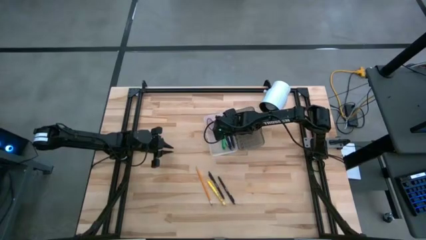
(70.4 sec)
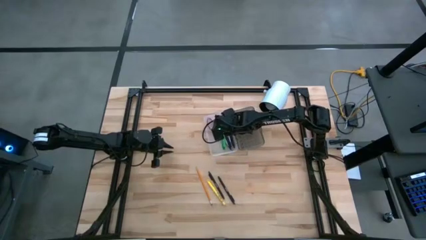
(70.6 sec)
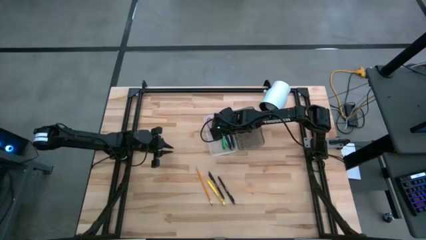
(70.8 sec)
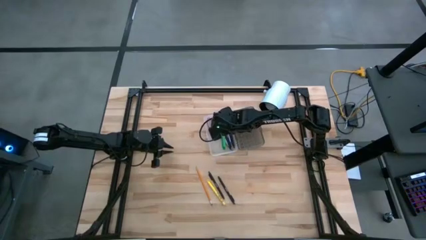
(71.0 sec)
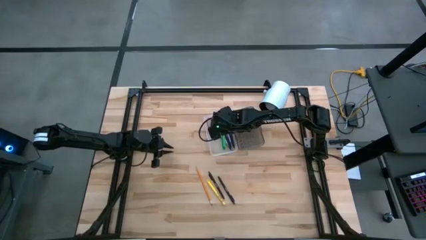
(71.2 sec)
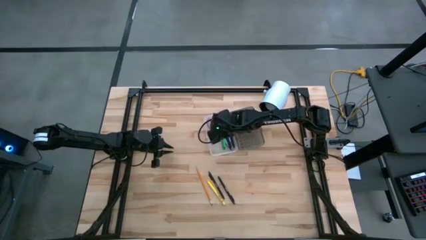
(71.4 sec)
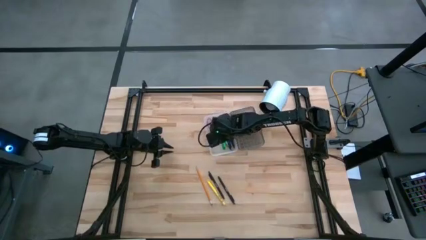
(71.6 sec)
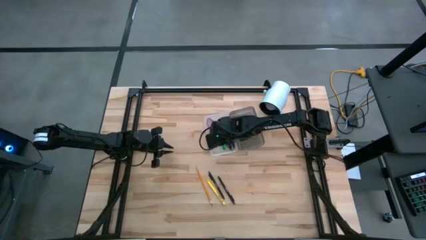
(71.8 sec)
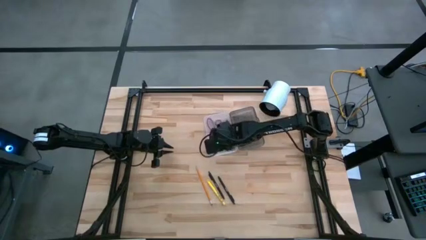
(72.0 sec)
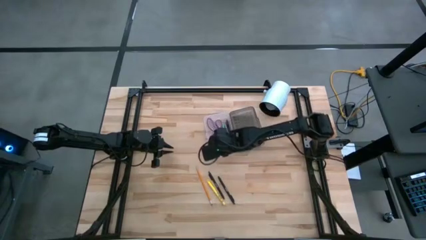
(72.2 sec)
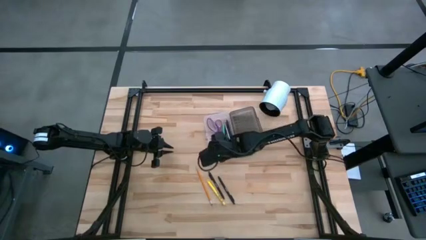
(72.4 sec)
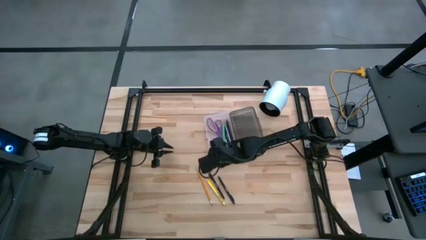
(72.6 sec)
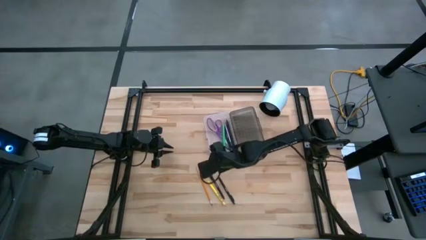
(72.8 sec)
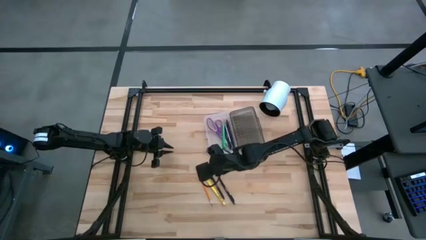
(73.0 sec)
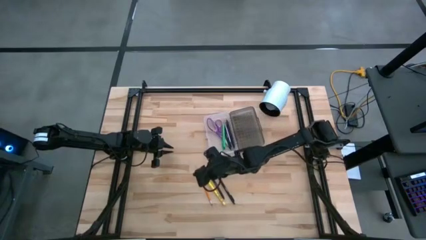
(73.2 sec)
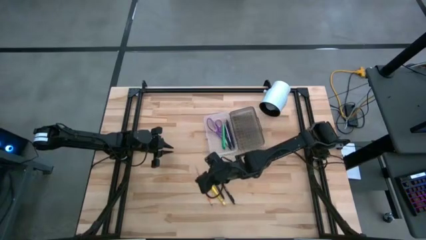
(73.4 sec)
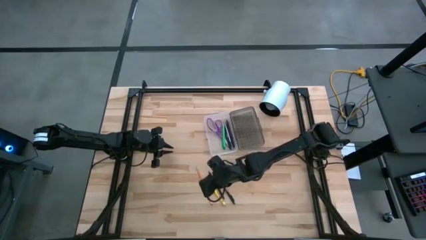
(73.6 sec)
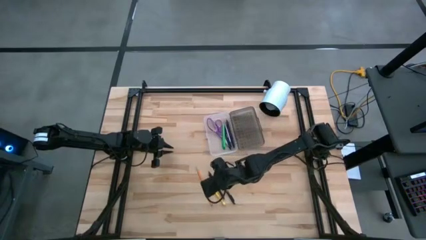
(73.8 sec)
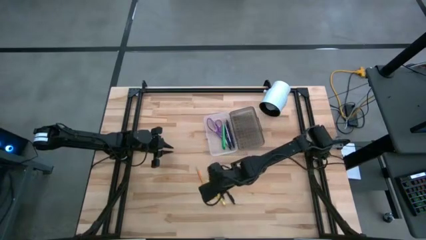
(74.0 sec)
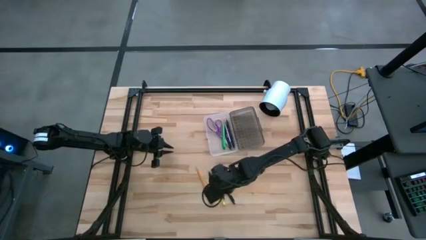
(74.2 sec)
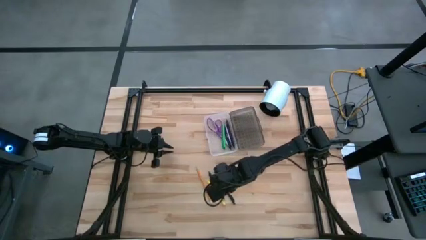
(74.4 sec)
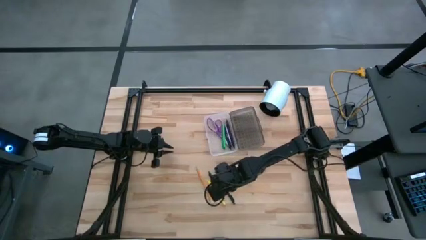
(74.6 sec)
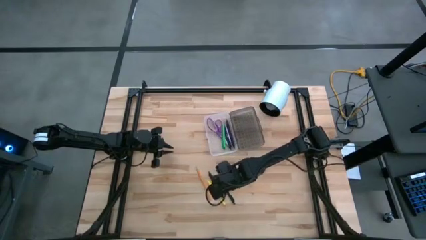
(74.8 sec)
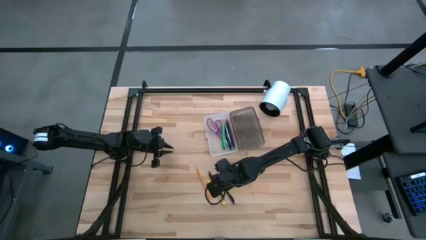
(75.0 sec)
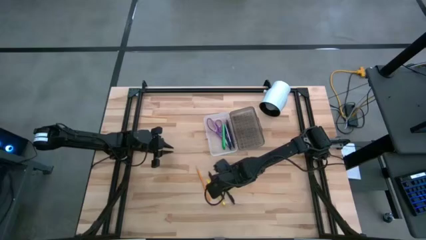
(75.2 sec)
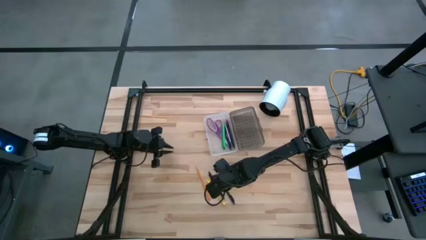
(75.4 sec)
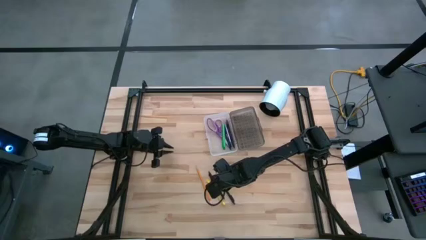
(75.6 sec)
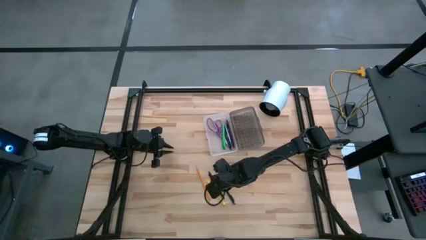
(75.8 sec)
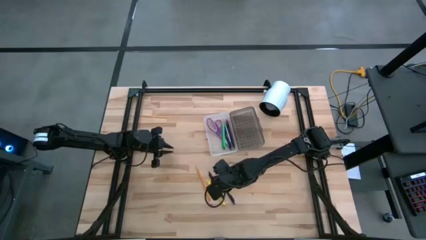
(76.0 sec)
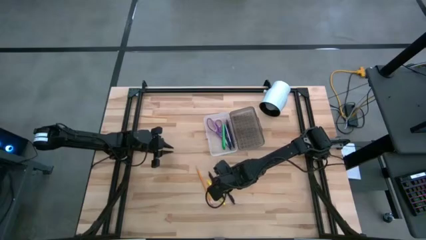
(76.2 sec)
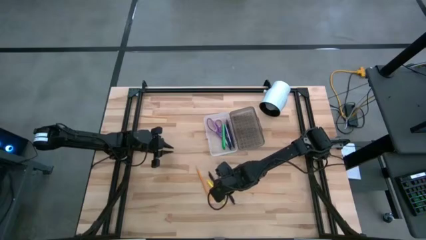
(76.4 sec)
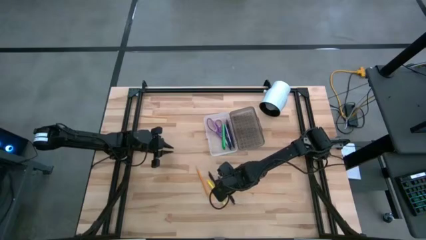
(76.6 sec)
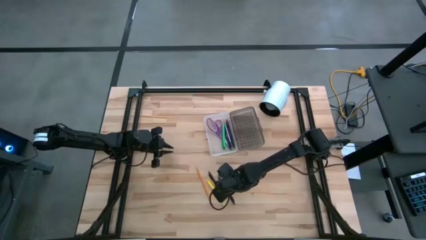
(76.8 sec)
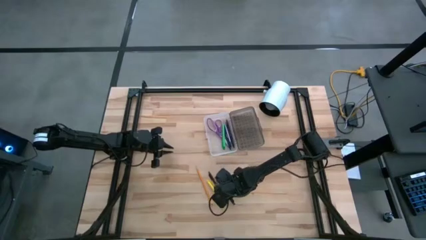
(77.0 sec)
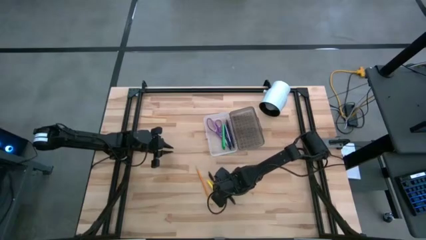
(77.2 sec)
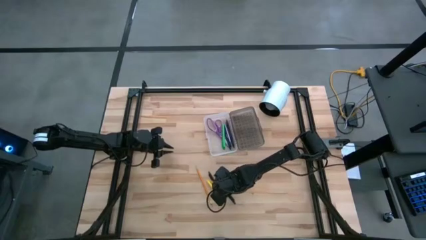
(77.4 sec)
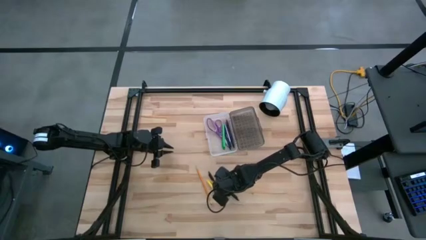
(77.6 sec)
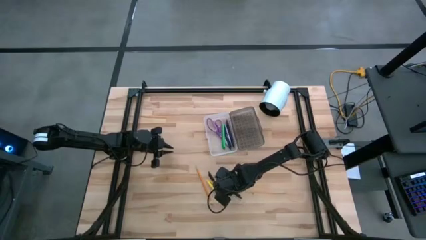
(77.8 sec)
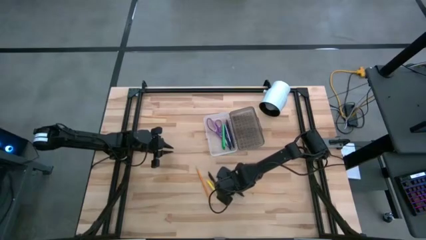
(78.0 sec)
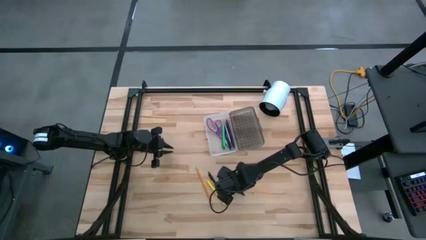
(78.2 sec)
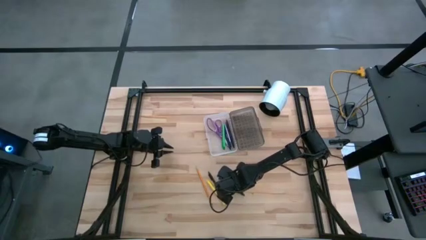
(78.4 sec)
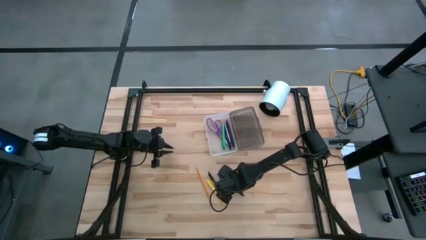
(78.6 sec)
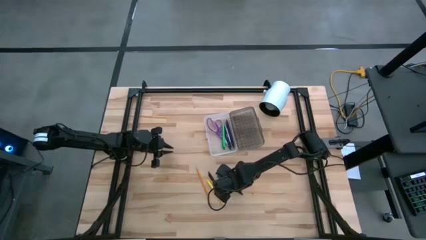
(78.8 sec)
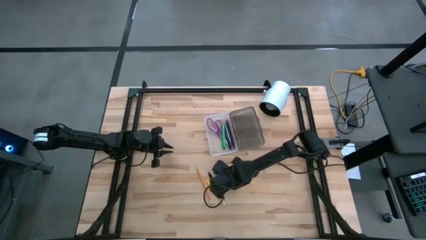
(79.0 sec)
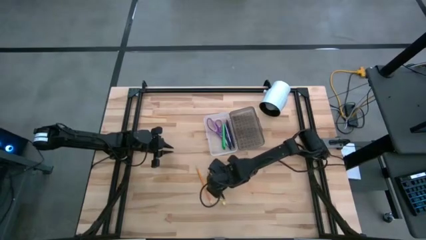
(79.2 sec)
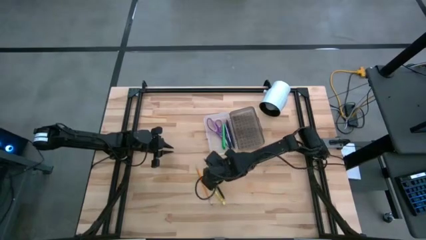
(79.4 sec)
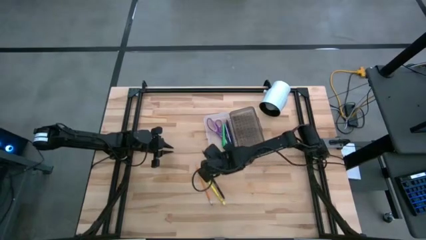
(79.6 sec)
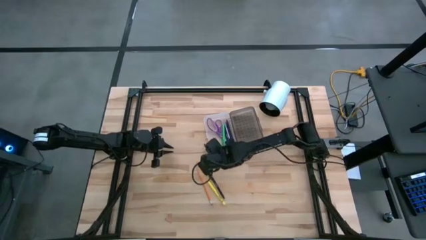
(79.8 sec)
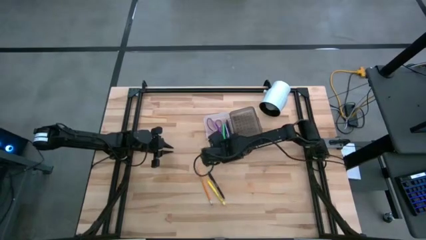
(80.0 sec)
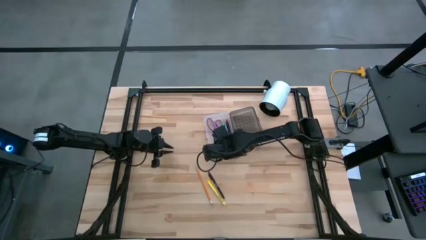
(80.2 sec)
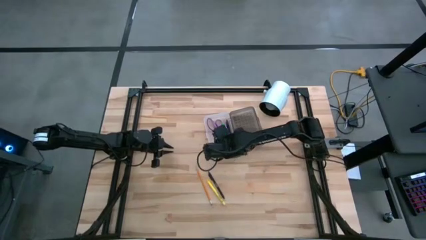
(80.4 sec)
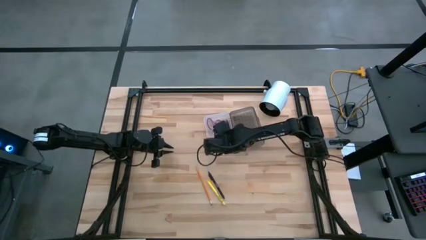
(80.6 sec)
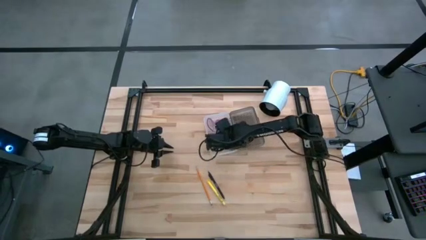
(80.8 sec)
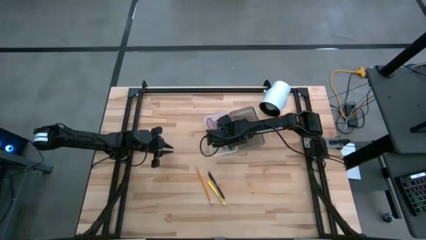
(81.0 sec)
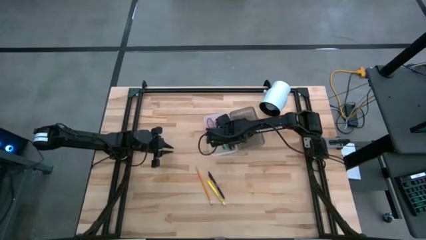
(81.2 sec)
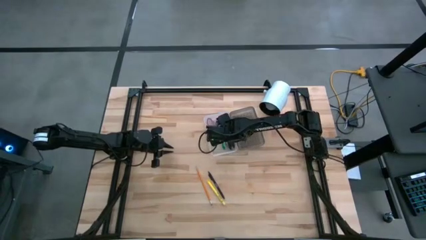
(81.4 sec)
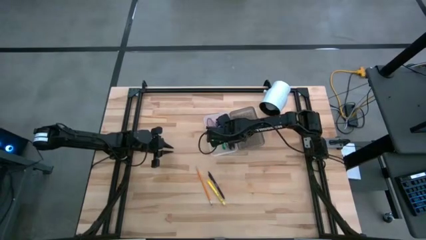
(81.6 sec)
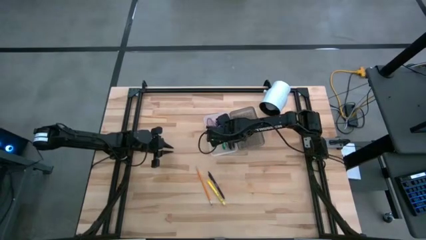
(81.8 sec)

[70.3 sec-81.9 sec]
Task: Pick & place school supplies into a supply box
Put the right black pen into the supply box

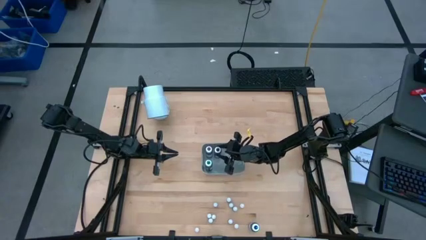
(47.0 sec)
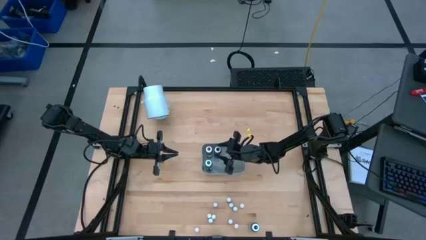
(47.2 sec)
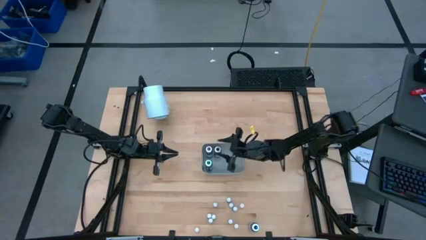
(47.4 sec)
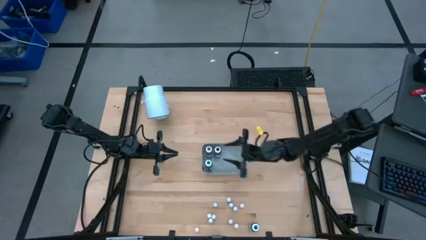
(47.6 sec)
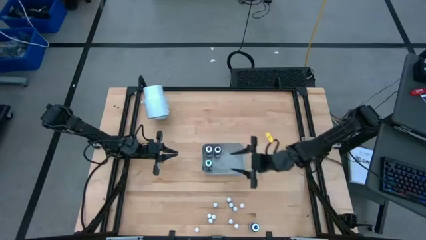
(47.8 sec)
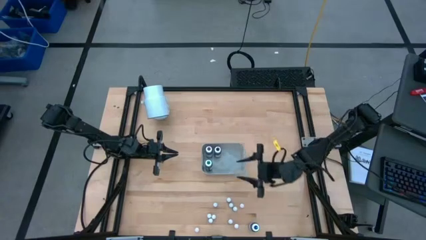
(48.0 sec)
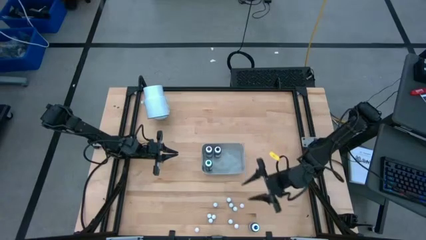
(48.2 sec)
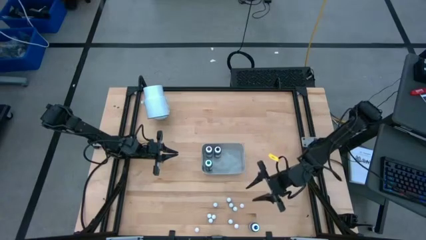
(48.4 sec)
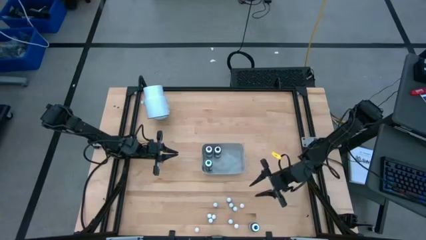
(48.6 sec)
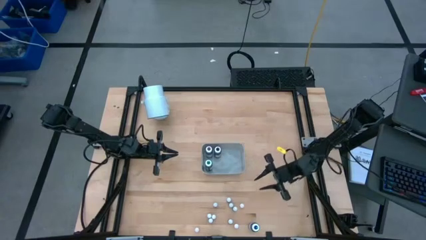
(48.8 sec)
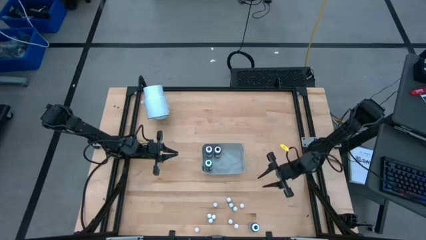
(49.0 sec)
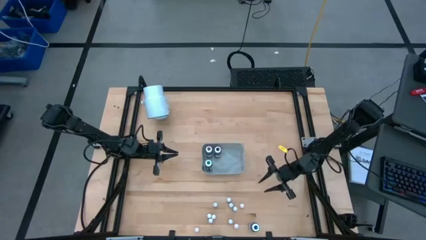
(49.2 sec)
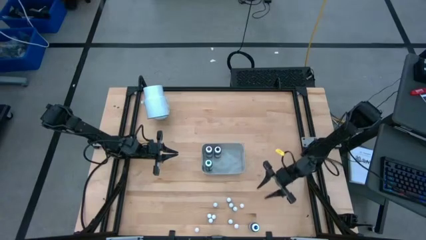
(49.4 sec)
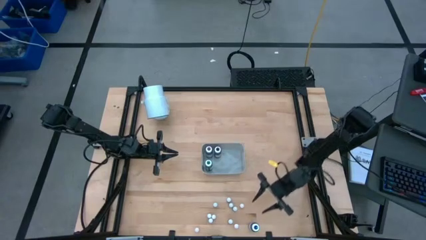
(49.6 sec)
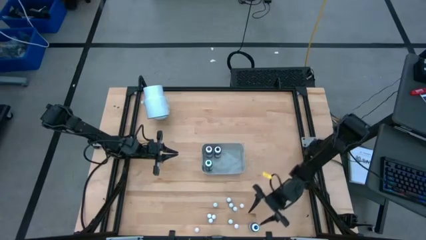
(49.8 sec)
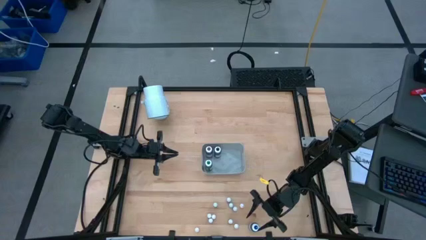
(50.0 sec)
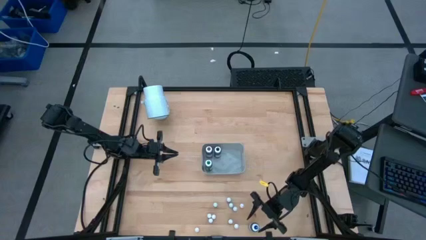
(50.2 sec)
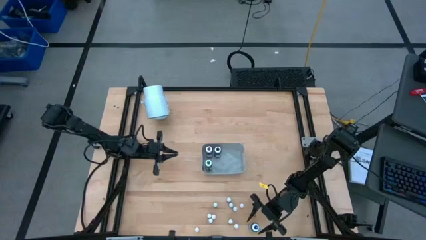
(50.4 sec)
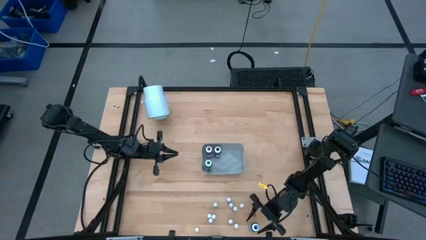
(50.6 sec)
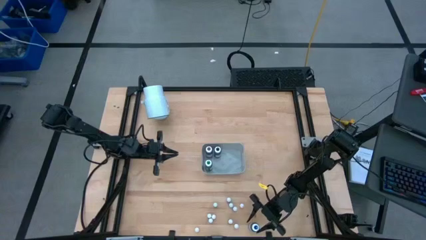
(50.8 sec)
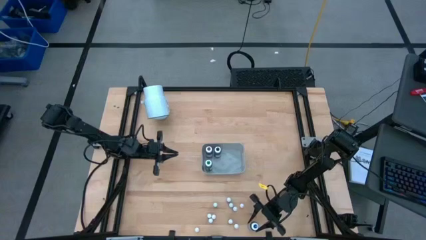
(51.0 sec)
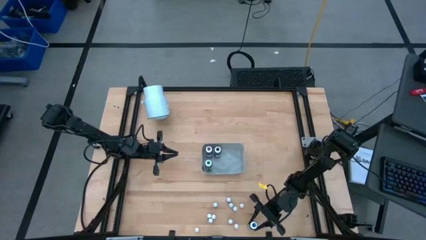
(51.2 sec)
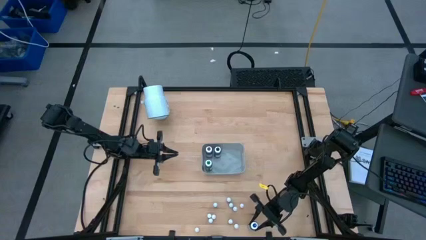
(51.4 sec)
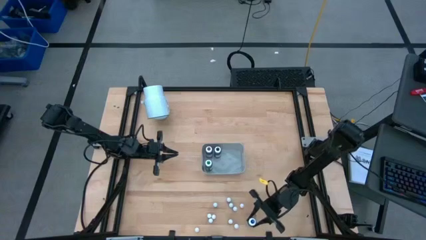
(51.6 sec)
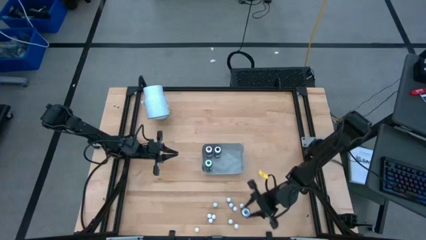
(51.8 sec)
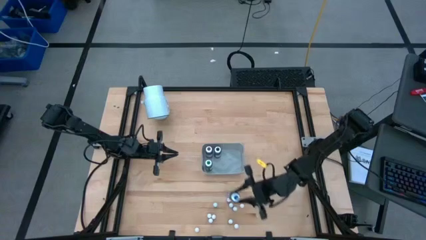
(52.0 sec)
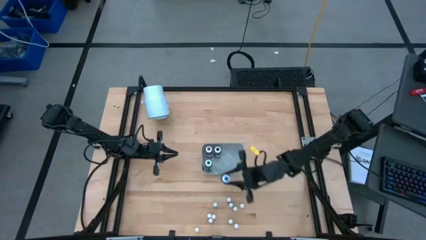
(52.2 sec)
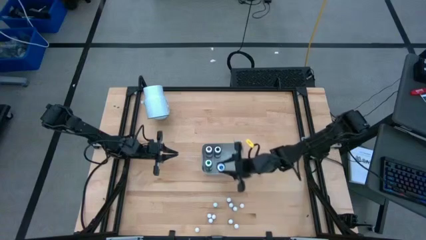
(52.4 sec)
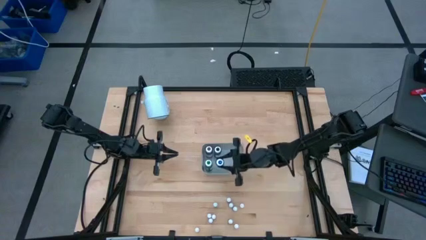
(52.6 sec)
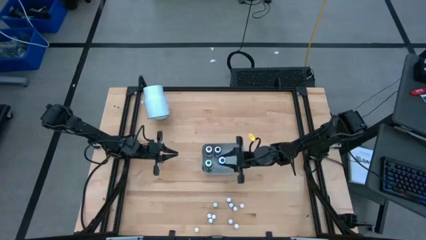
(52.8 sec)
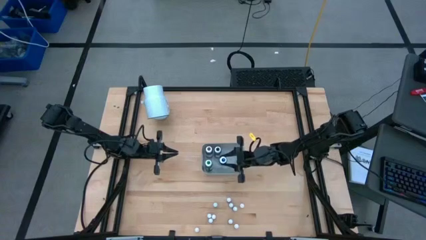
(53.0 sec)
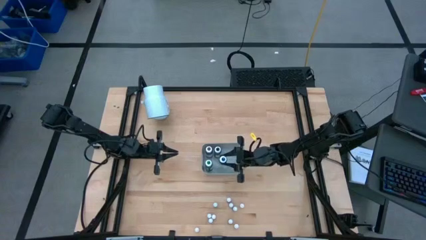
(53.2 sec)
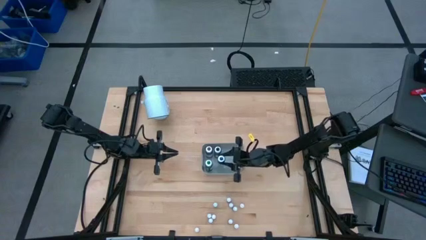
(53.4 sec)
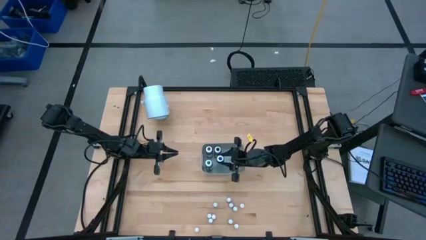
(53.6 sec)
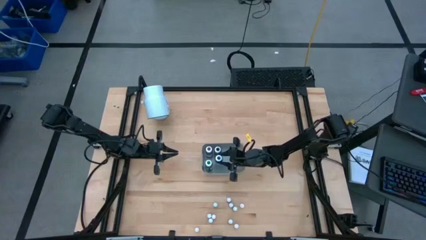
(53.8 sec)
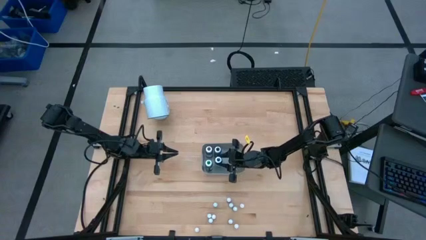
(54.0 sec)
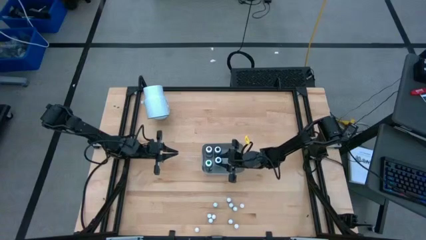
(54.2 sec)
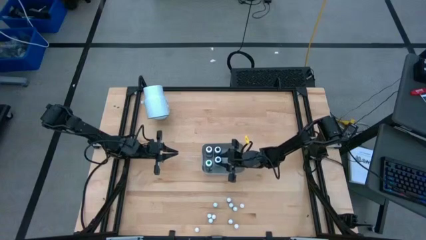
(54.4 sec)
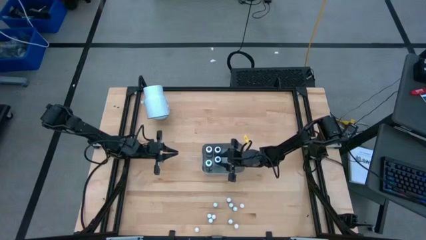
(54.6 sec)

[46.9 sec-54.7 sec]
Task: Pick & Place food coloring
Put the large blue food coloring bottle into the bin
